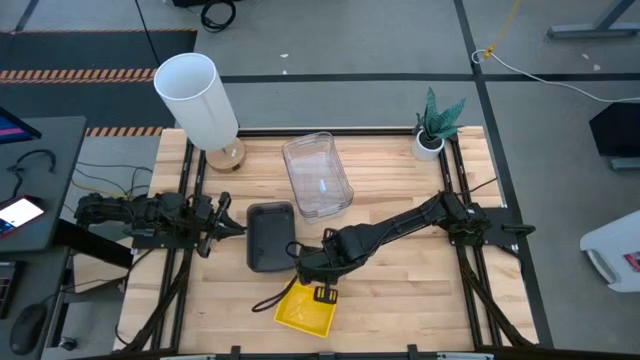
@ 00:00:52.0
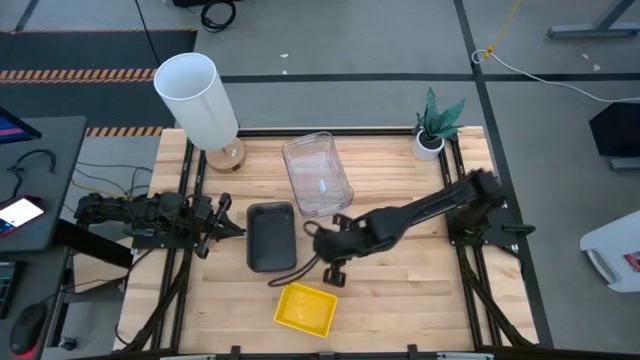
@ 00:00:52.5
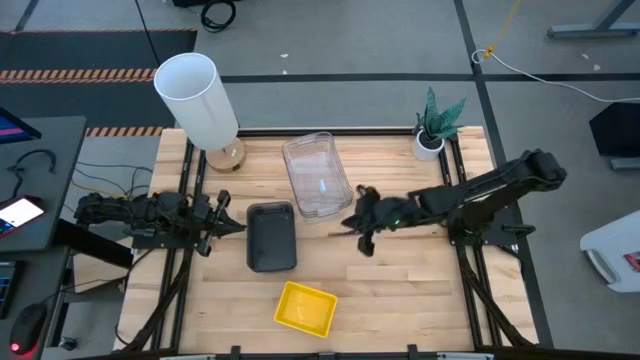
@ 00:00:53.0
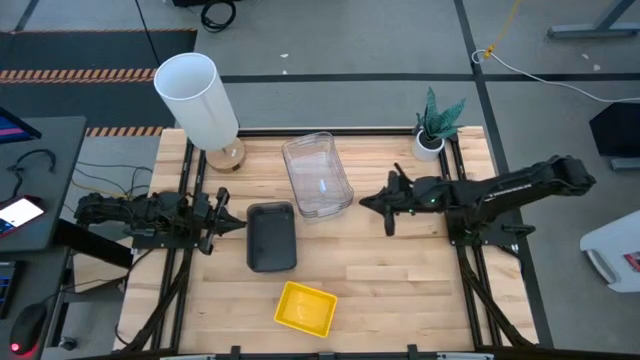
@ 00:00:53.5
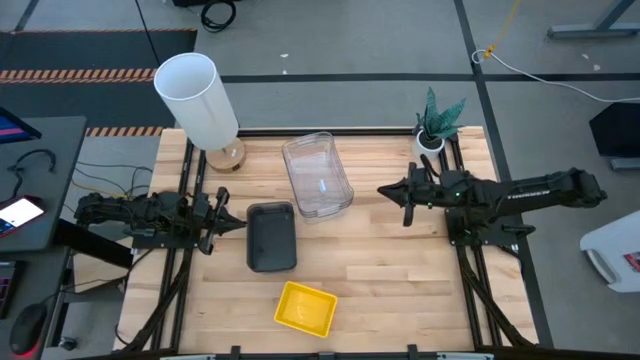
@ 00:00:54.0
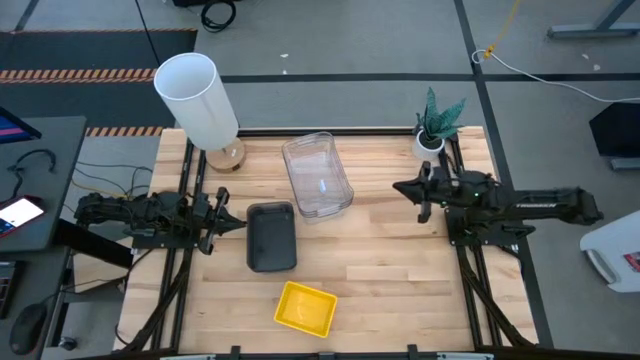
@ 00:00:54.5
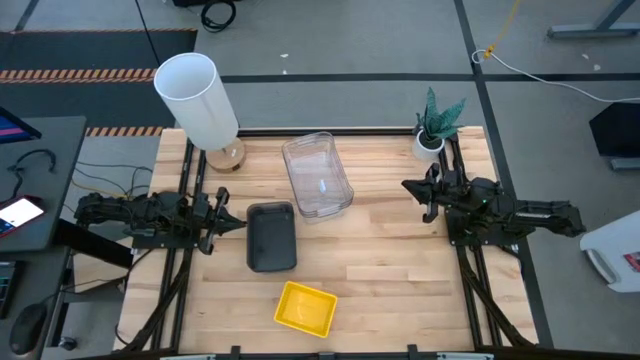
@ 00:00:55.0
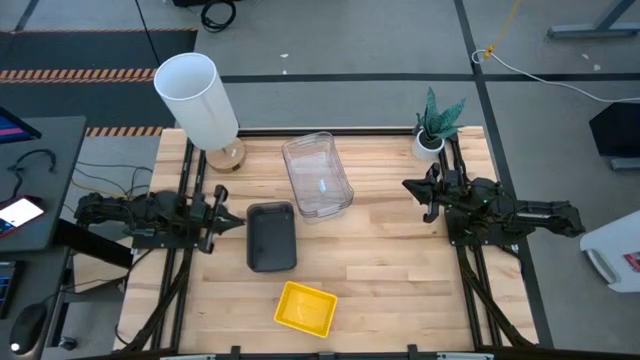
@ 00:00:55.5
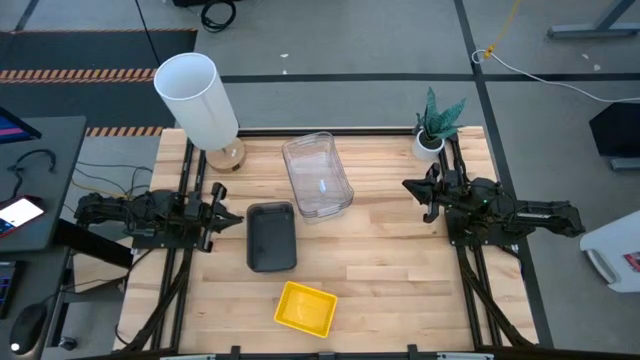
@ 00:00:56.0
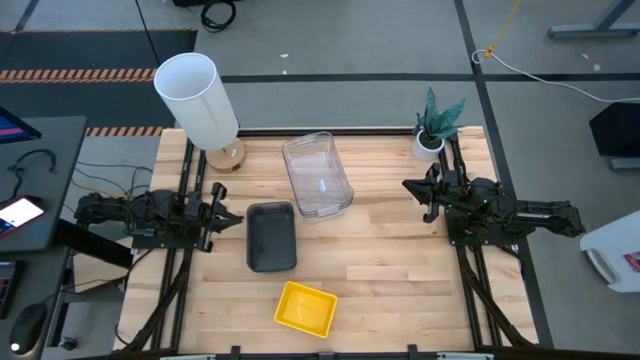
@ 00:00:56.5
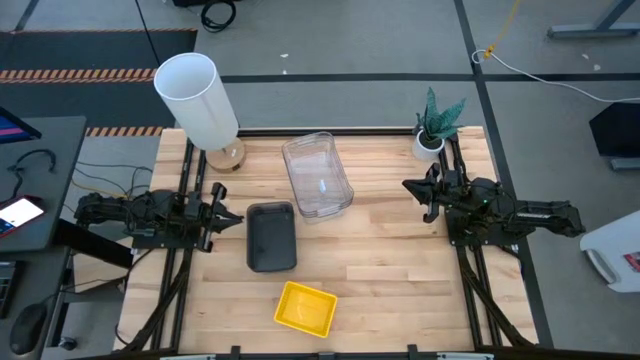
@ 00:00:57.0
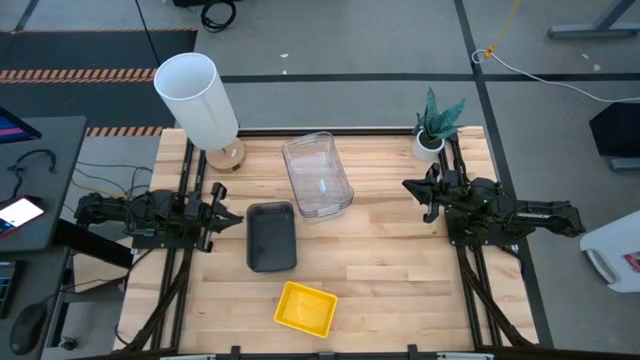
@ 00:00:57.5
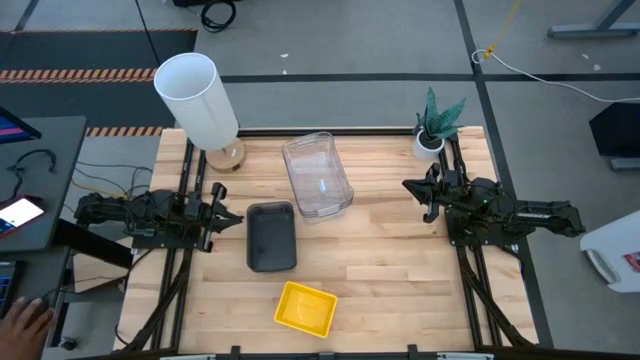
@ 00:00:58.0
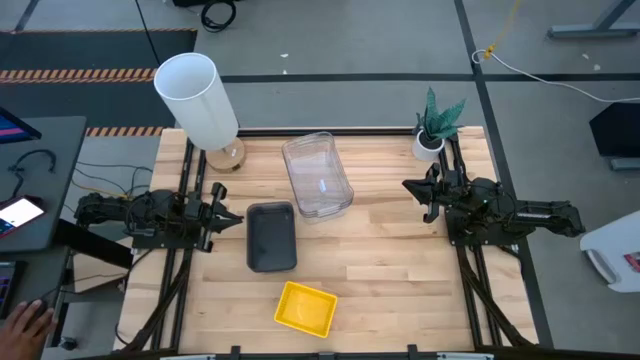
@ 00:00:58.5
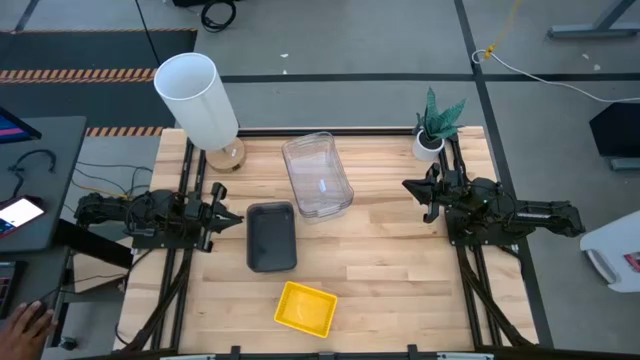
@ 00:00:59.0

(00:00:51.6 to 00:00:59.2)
Return to Home Position

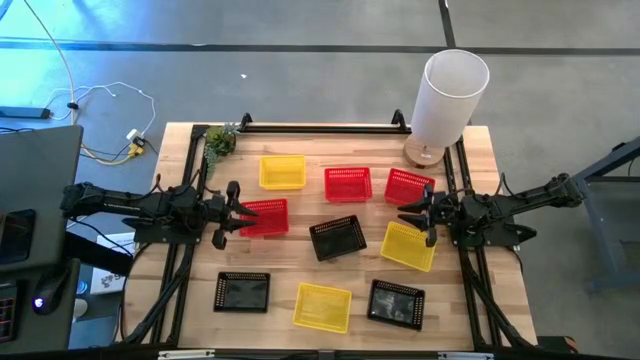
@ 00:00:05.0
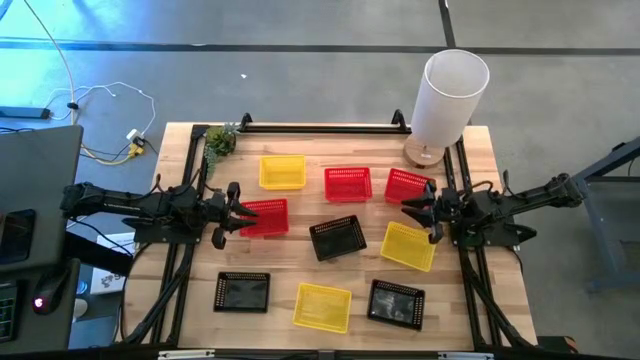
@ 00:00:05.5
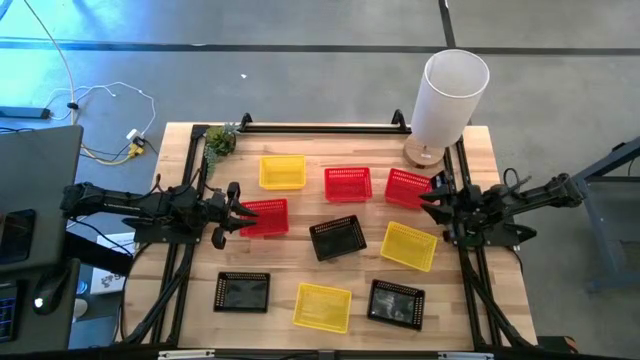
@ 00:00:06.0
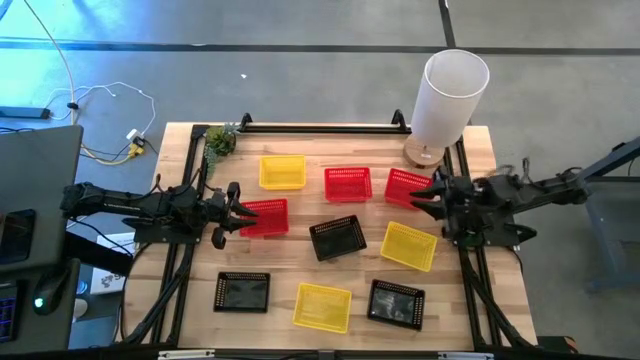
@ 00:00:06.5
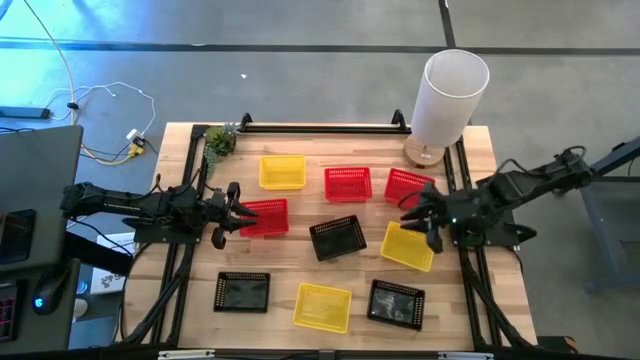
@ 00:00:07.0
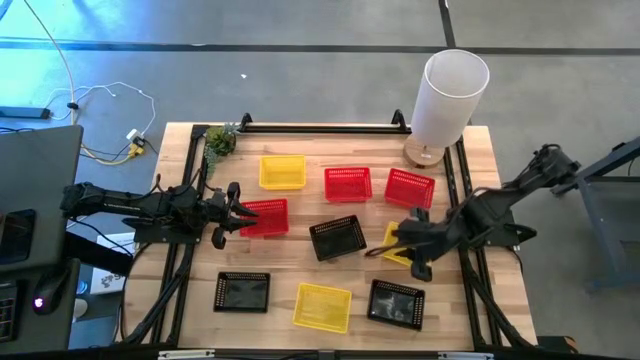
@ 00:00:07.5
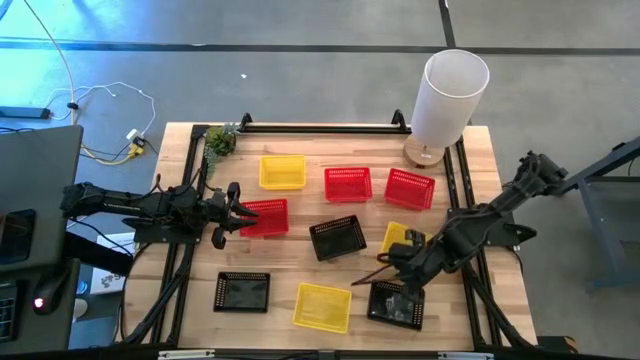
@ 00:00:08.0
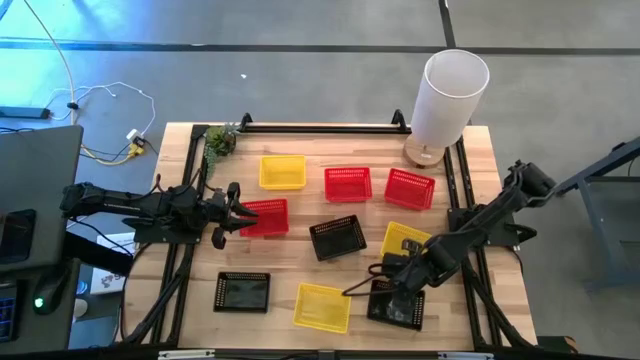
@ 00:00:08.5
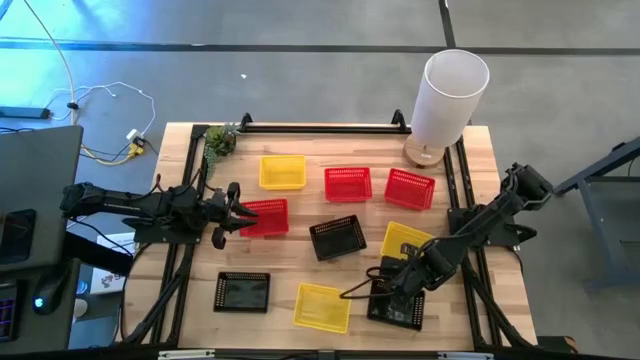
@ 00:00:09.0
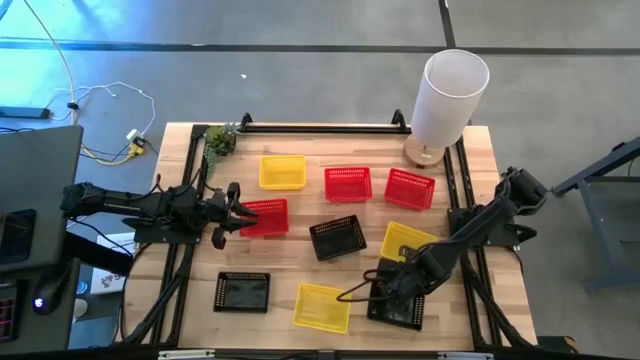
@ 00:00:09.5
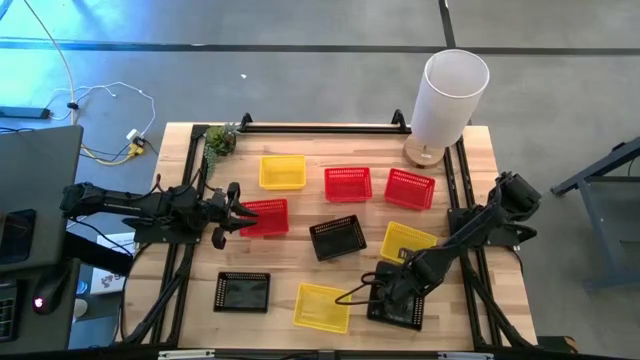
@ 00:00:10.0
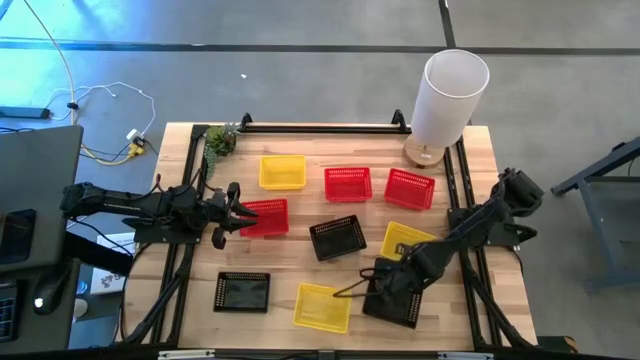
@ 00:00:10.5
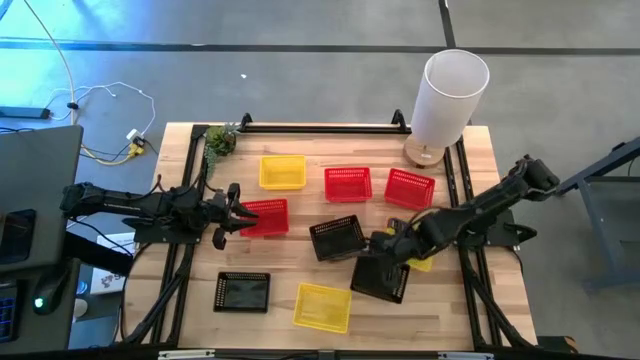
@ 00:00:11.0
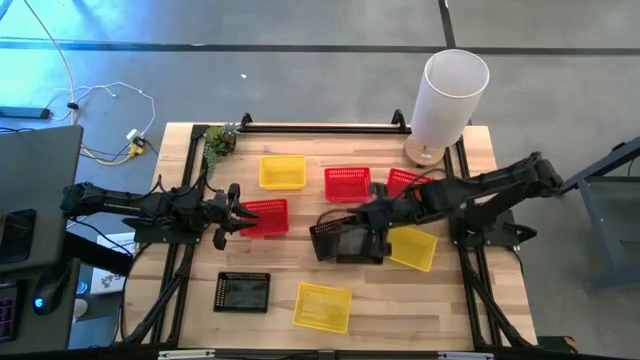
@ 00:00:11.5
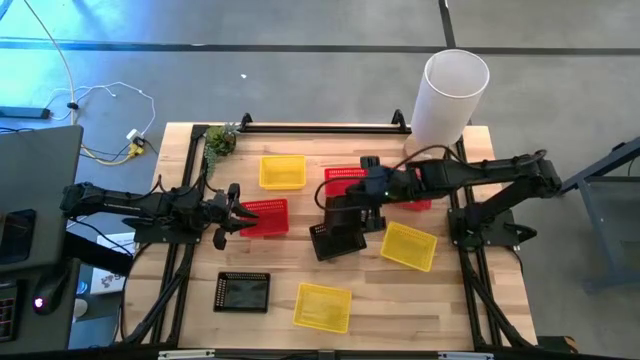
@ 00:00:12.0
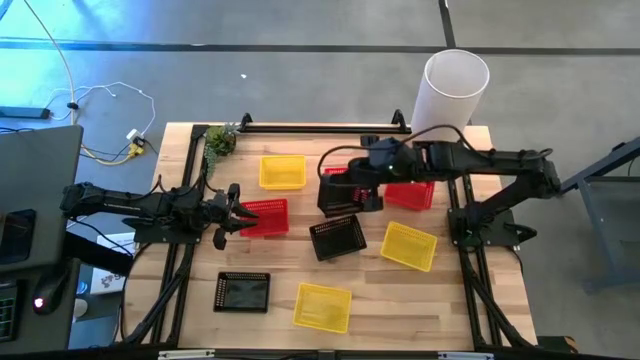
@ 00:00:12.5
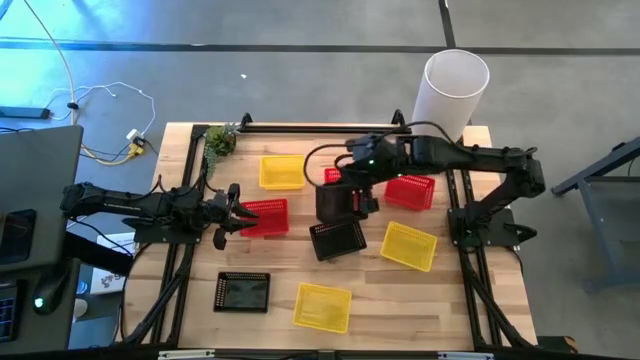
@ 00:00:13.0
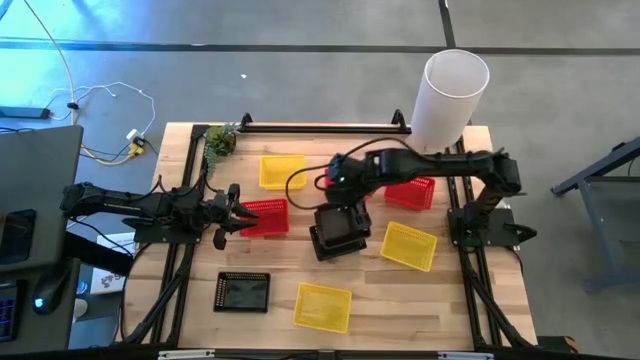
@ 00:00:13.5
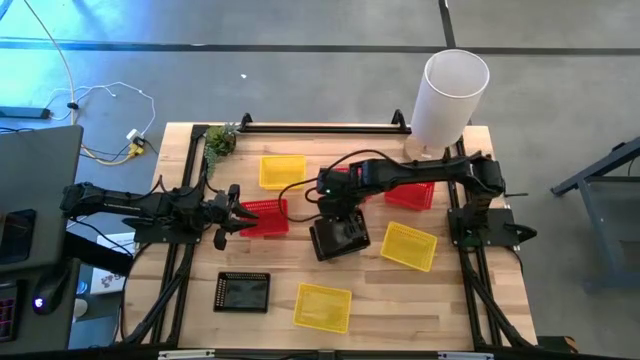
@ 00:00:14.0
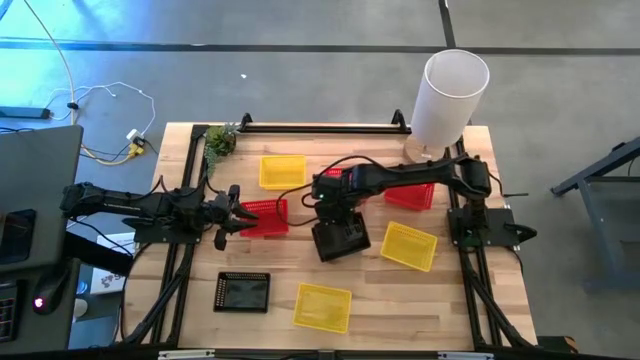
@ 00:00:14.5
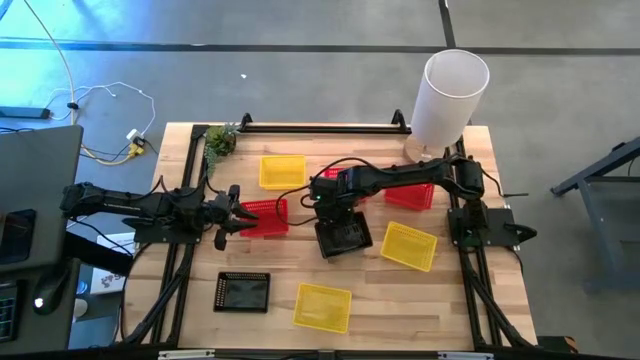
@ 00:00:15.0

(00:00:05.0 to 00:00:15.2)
Stack the bottom right black bin on the top black bin
